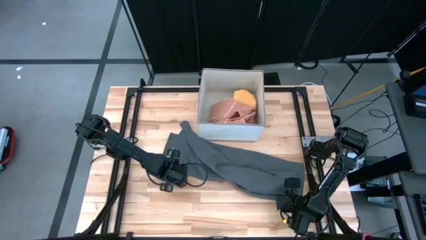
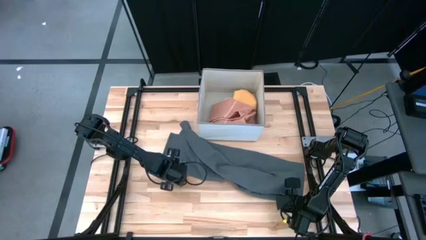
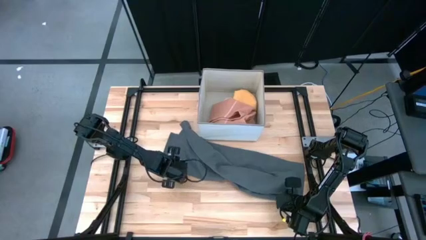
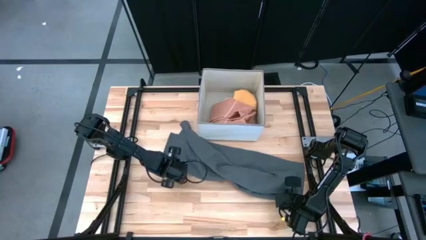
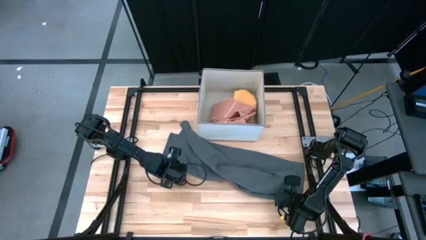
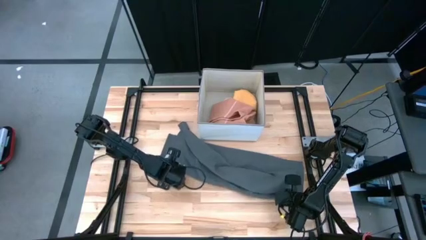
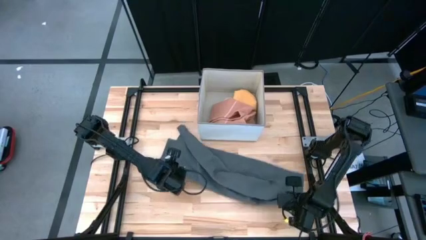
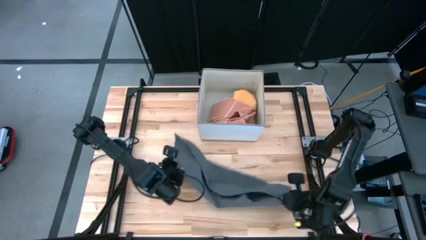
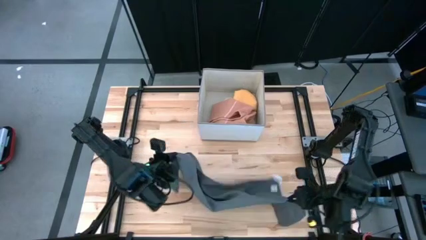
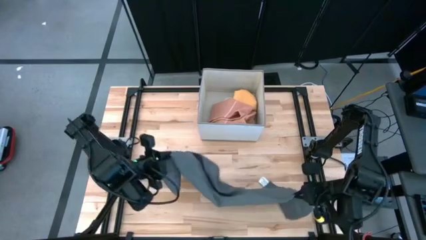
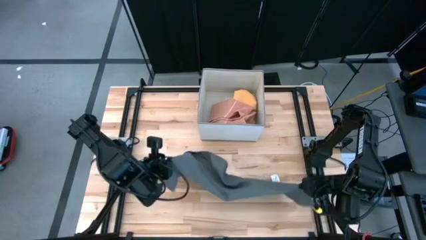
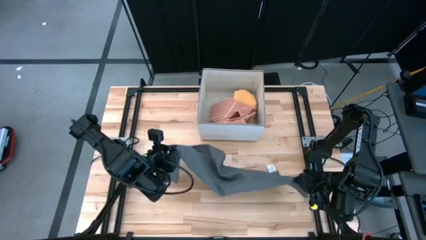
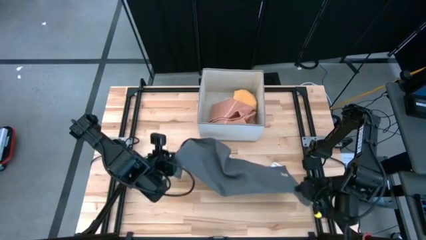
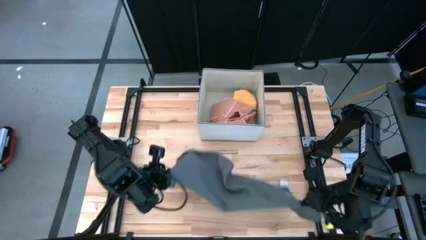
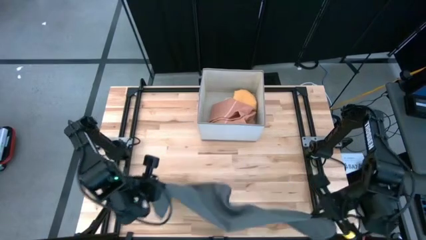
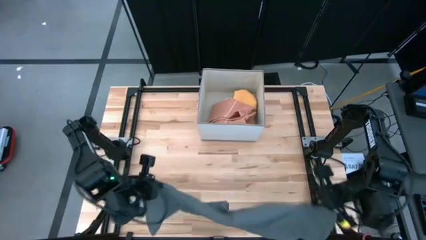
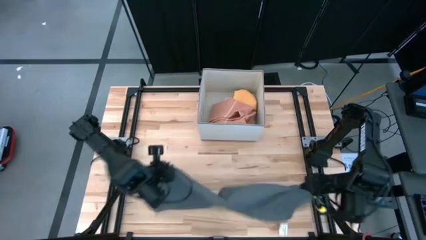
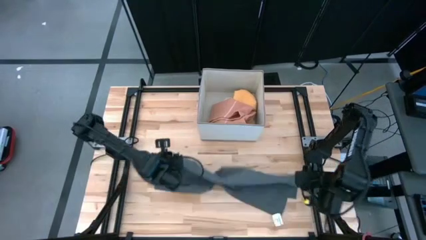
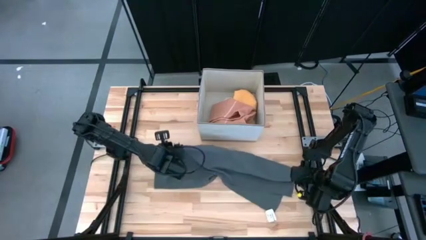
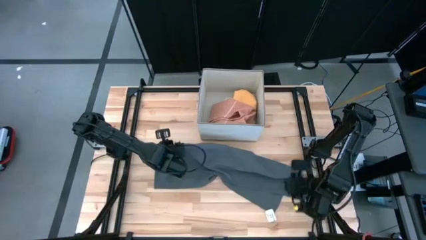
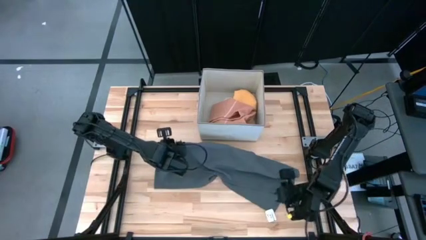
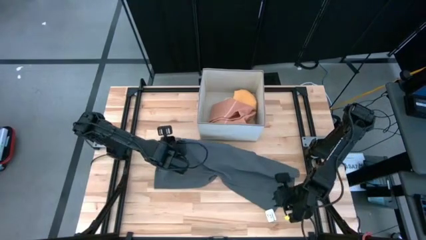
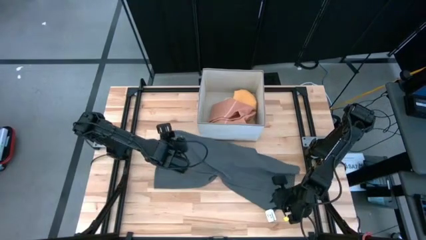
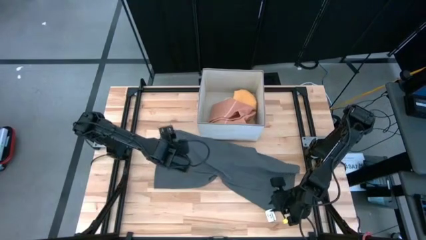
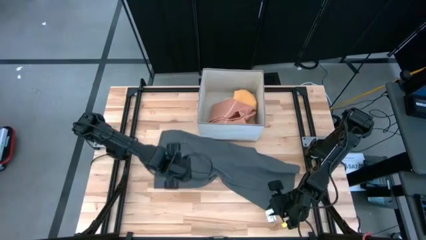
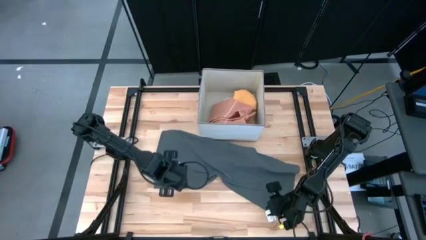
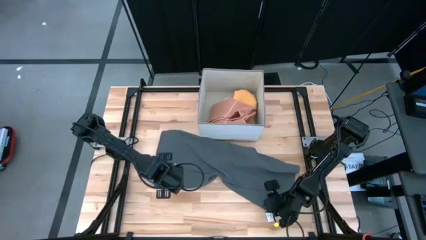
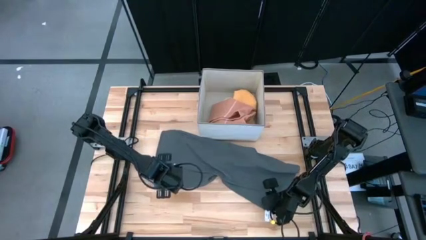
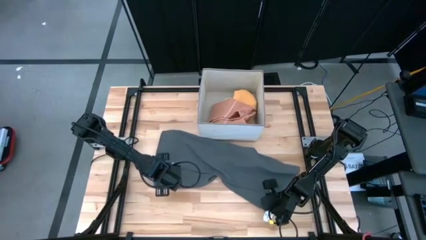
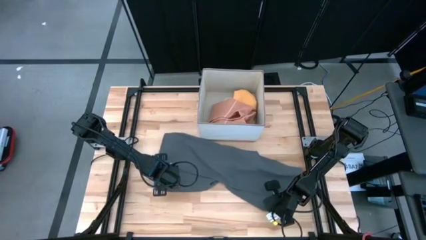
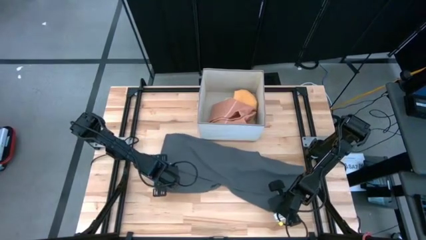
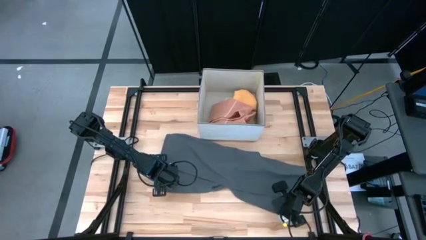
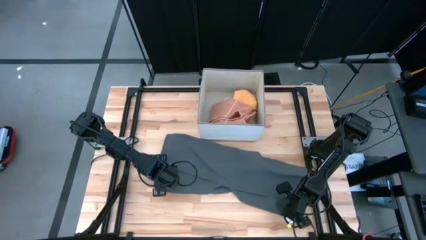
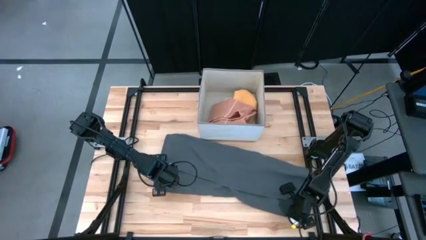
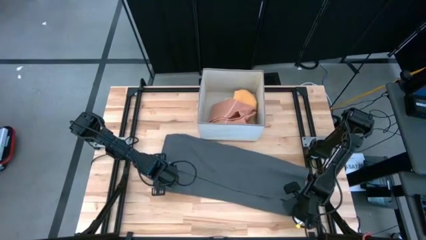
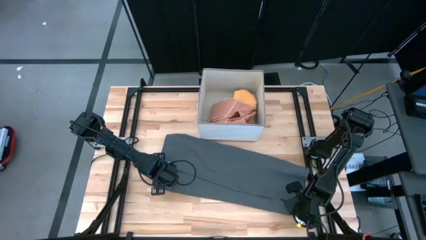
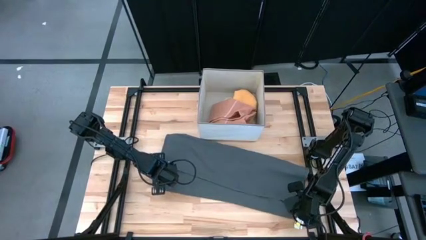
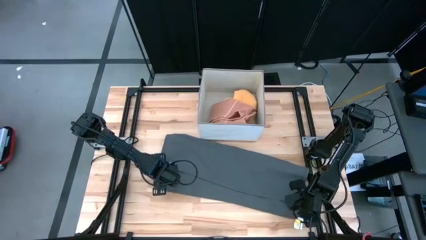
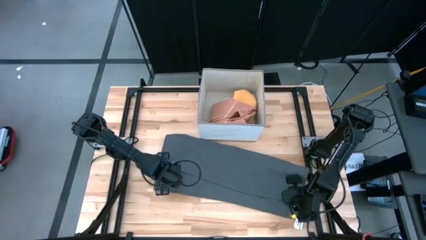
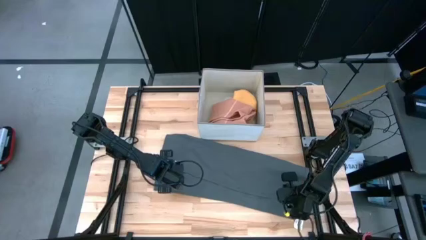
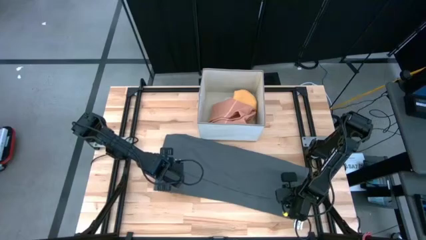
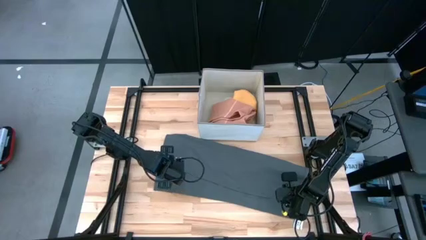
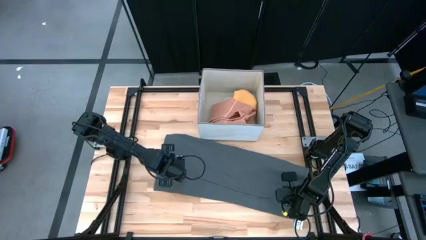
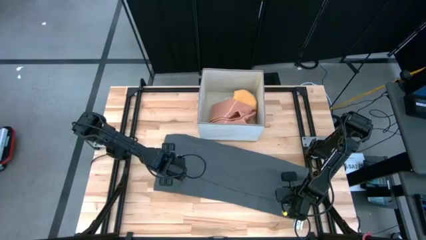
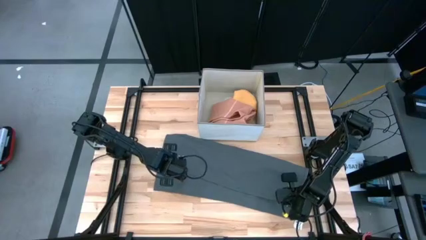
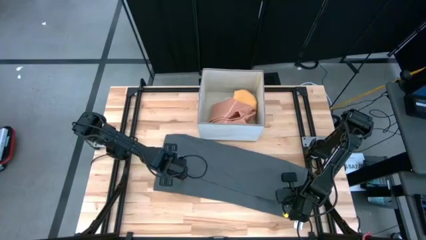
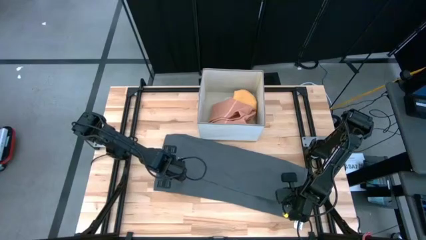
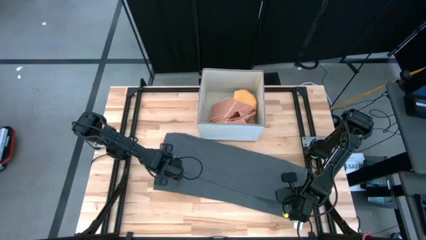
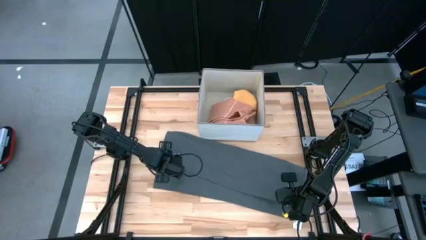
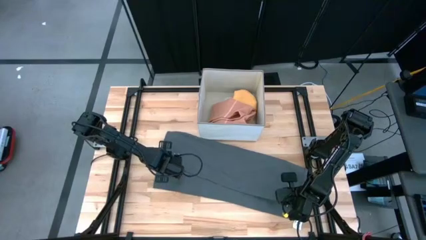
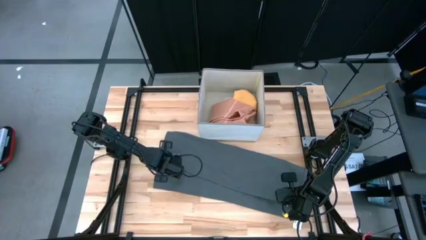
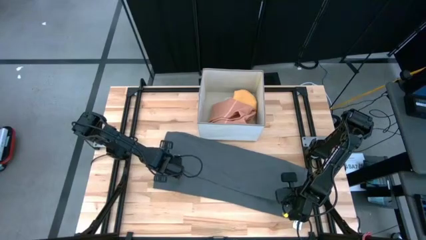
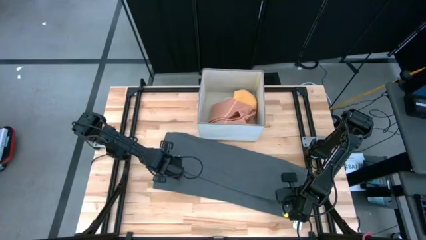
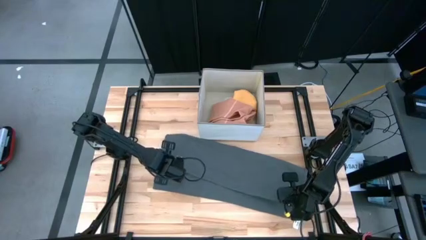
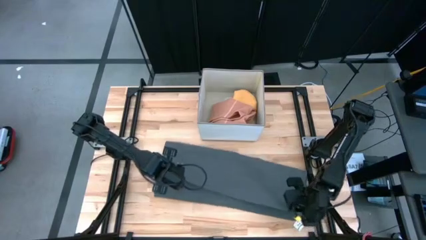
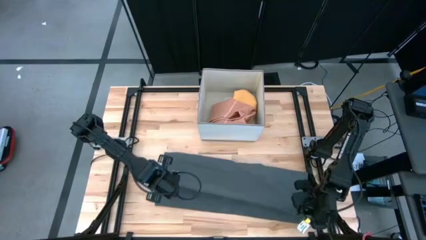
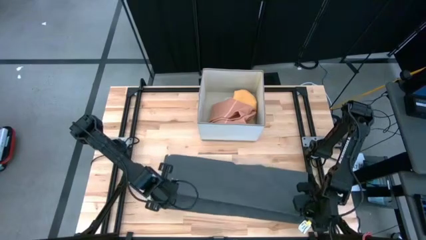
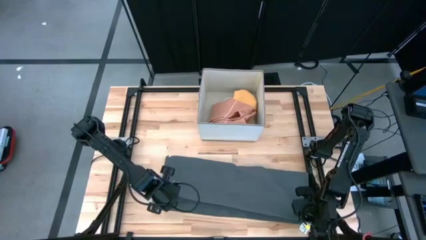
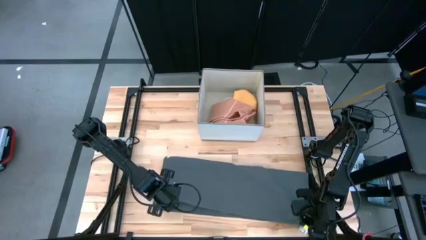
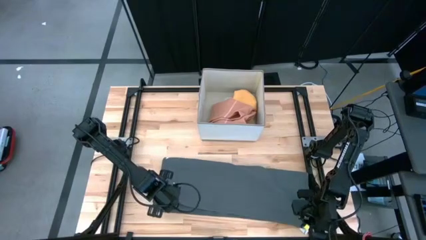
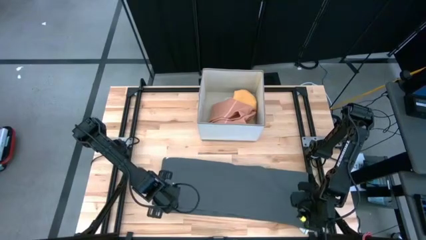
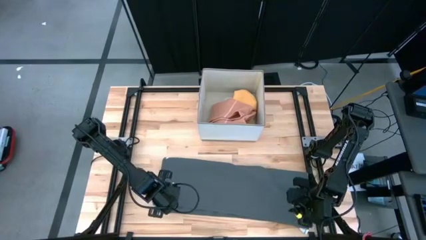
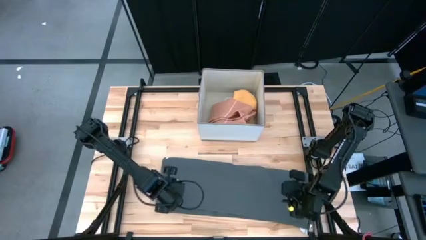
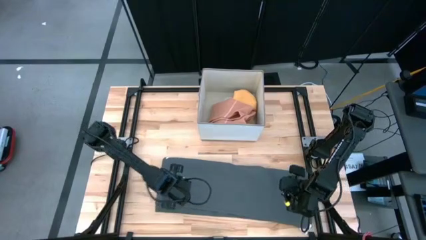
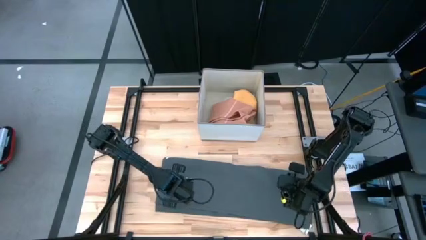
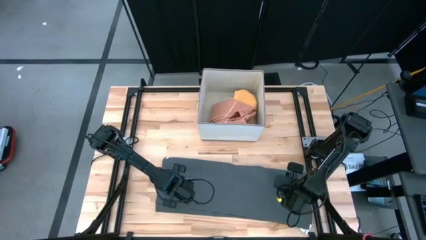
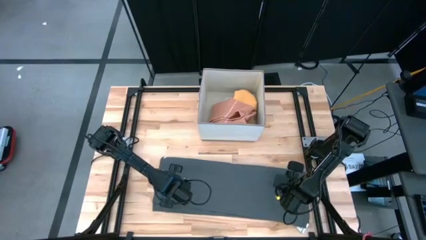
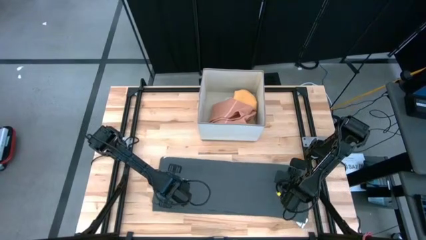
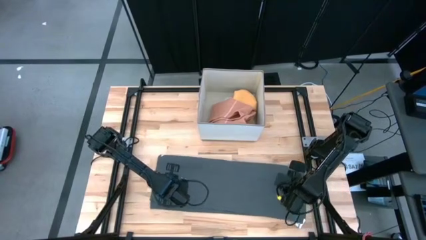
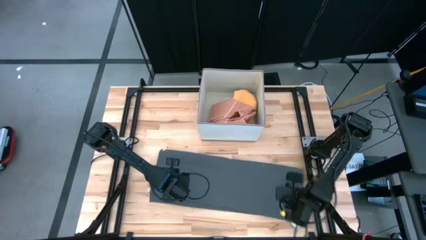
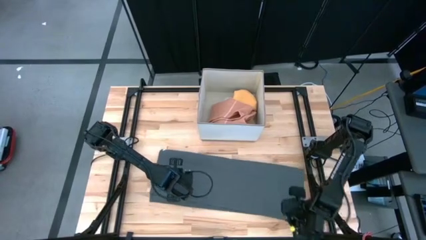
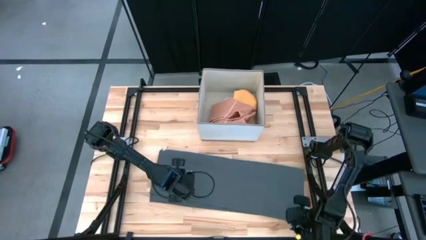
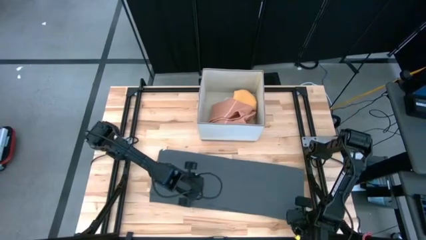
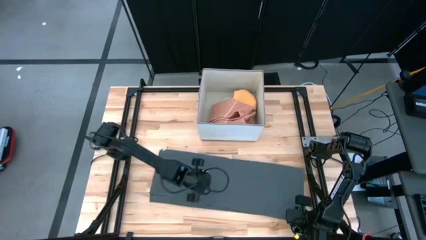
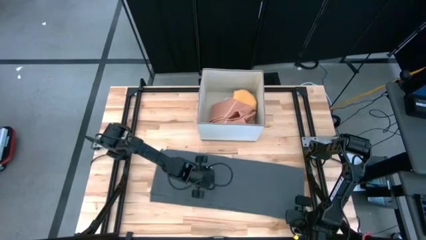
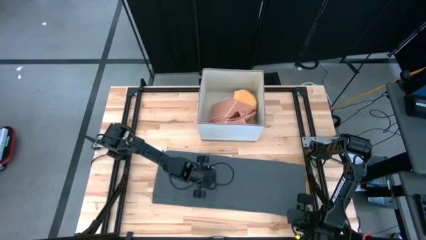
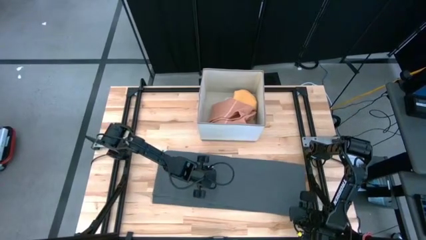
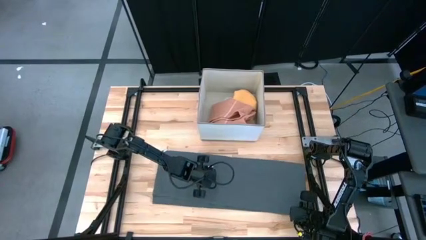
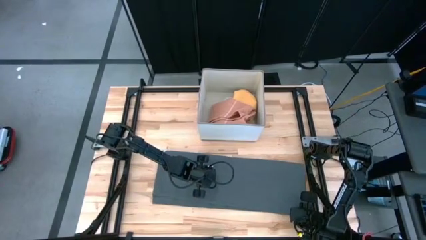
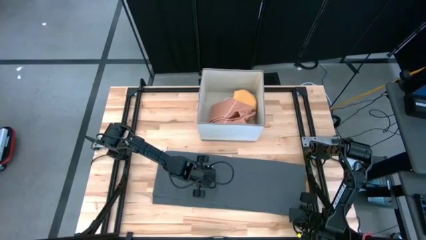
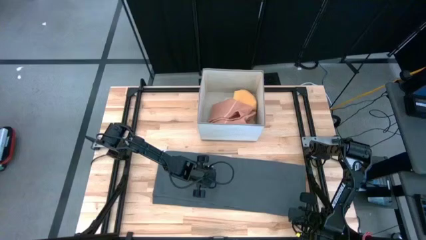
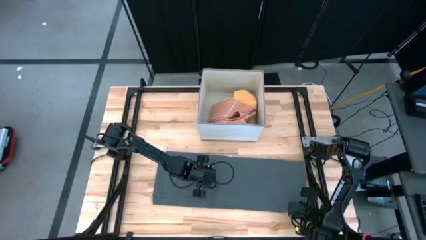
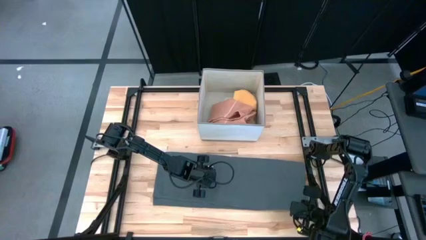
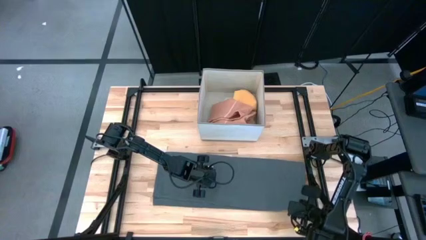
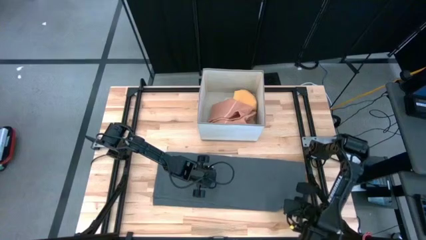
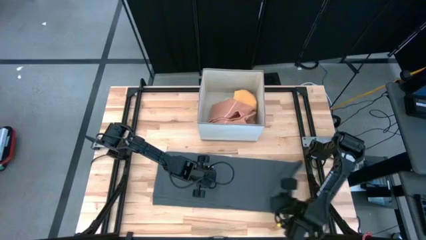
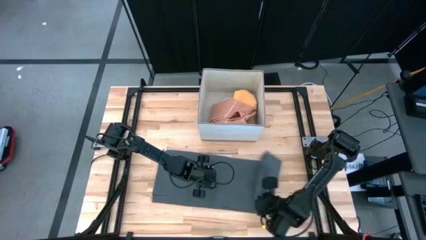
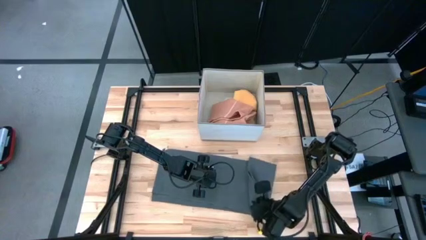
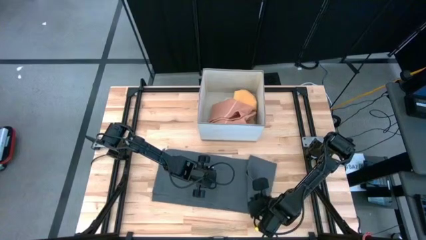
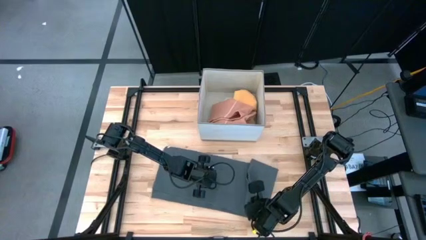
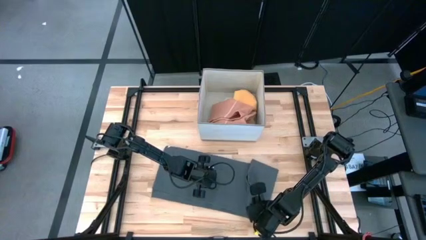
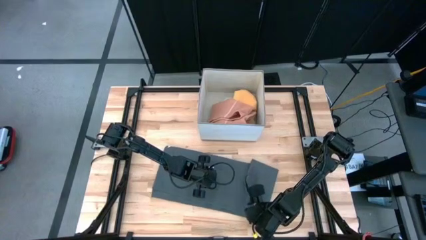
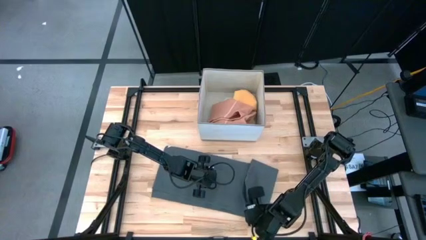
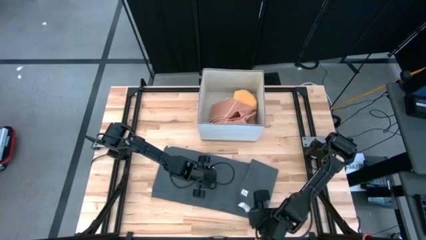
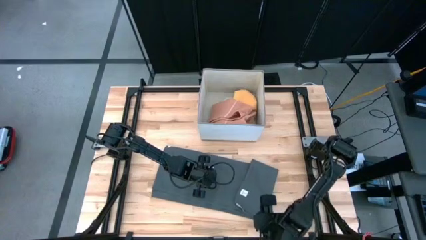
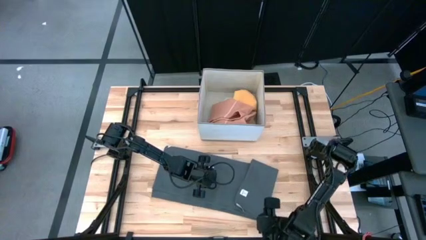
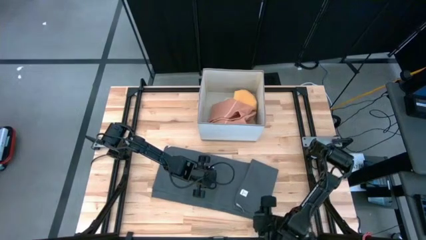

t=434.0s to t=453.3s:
Task: Fold towel
Fold the dark gray towel
